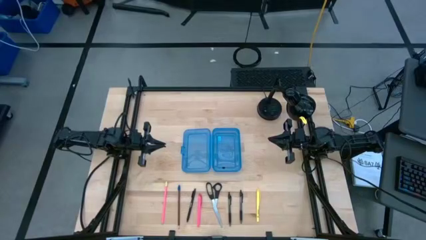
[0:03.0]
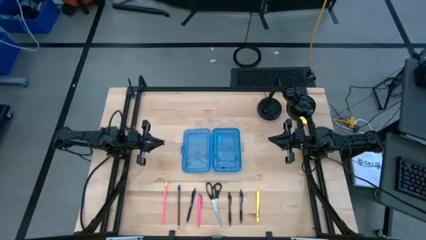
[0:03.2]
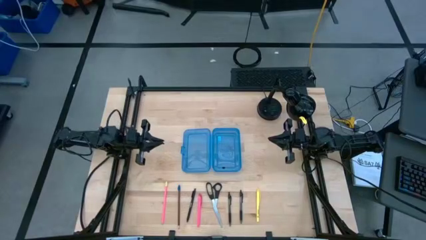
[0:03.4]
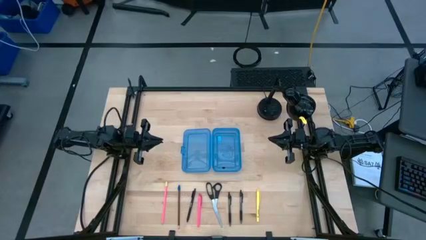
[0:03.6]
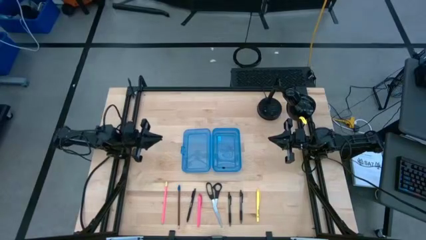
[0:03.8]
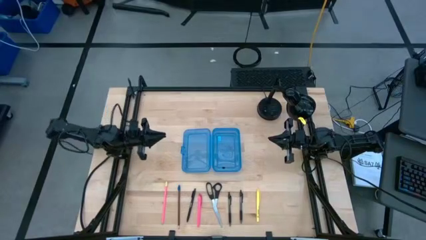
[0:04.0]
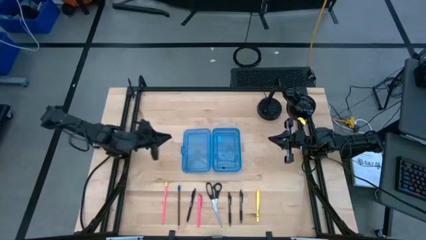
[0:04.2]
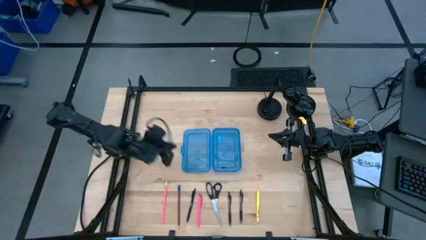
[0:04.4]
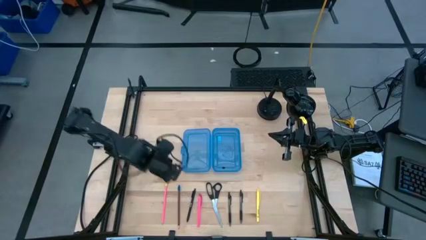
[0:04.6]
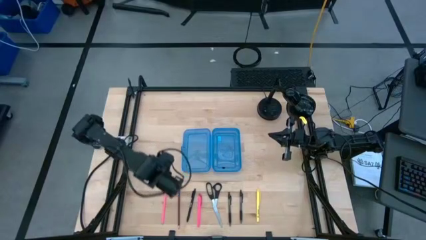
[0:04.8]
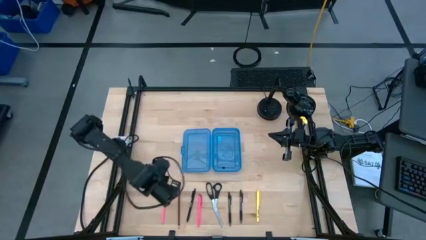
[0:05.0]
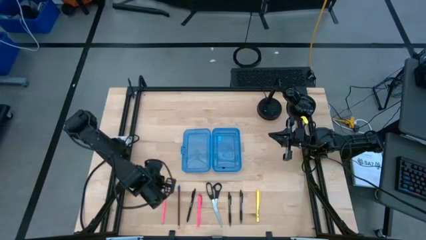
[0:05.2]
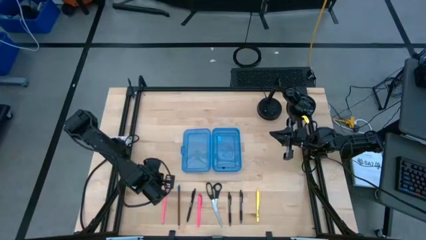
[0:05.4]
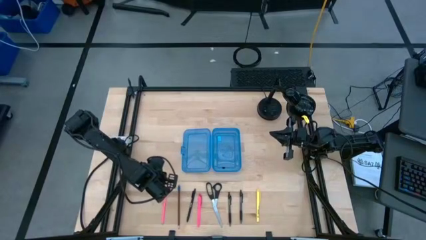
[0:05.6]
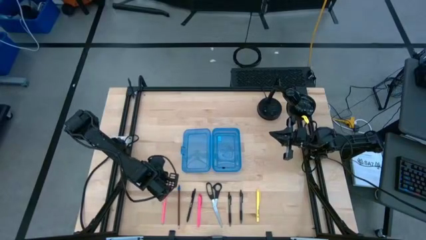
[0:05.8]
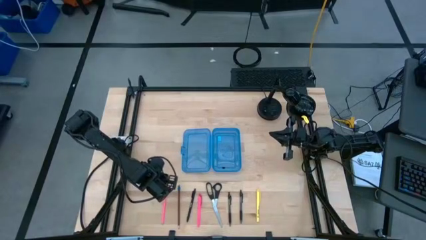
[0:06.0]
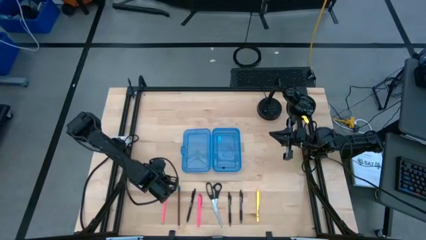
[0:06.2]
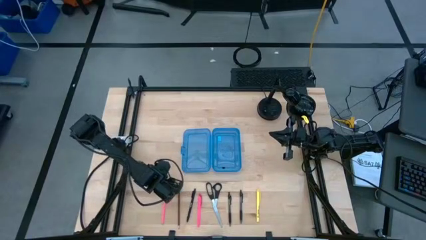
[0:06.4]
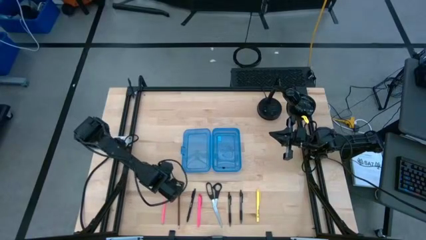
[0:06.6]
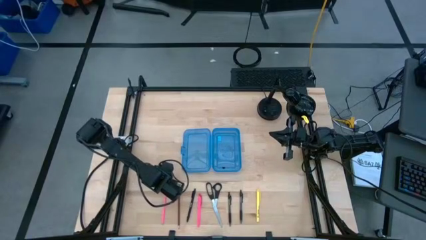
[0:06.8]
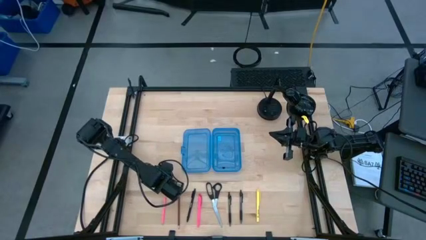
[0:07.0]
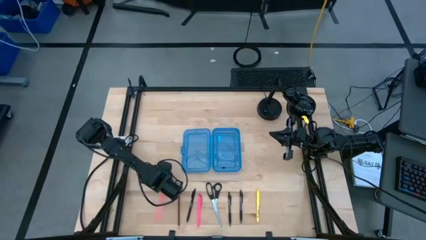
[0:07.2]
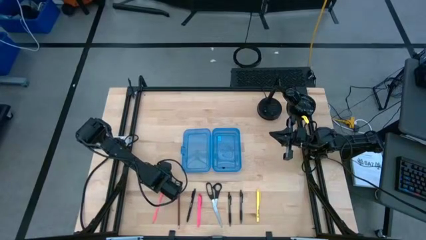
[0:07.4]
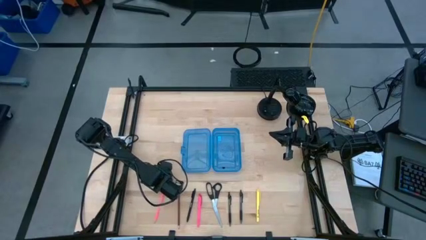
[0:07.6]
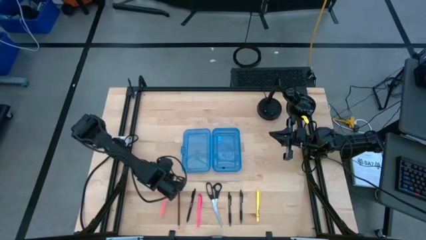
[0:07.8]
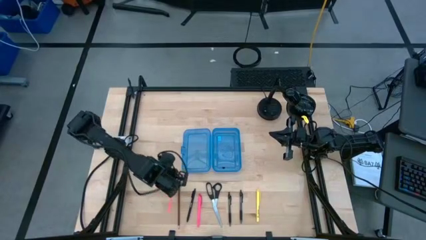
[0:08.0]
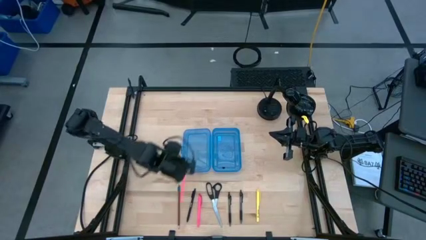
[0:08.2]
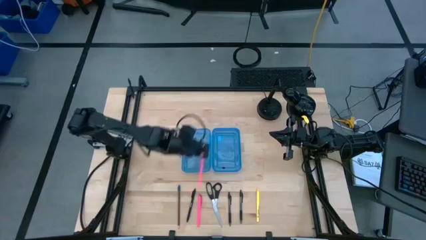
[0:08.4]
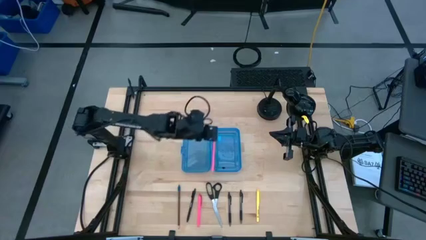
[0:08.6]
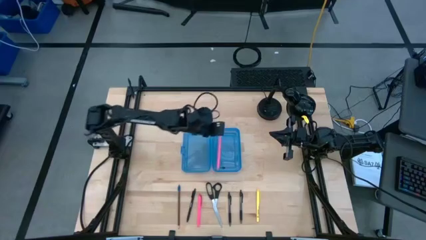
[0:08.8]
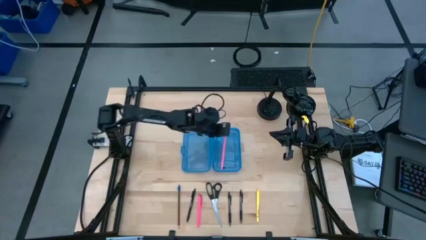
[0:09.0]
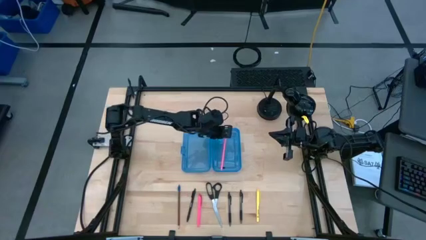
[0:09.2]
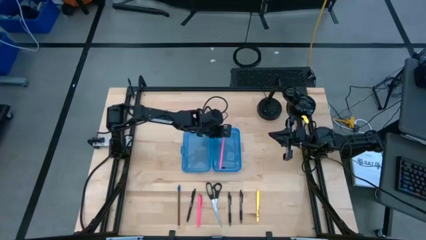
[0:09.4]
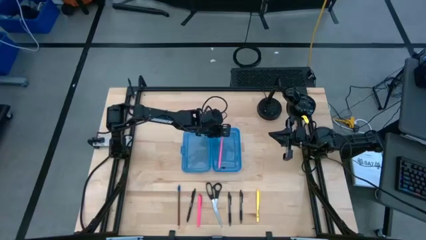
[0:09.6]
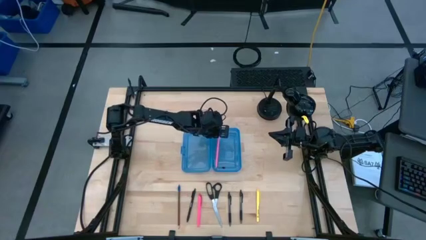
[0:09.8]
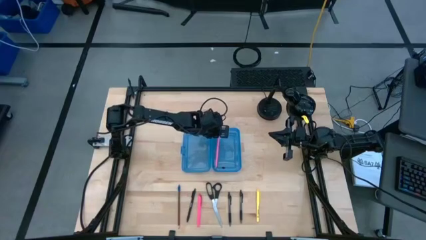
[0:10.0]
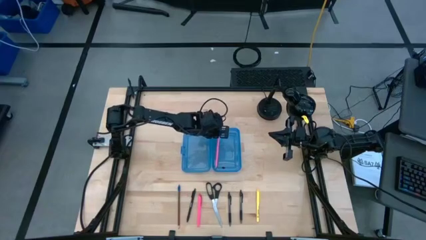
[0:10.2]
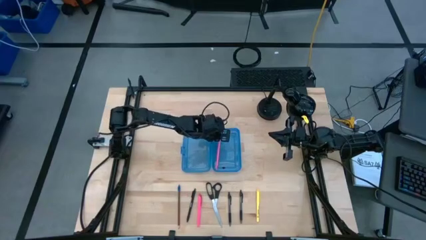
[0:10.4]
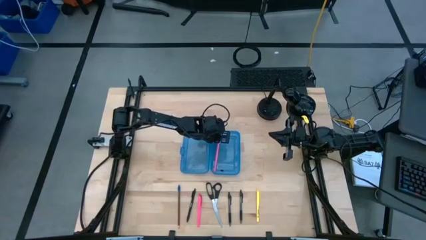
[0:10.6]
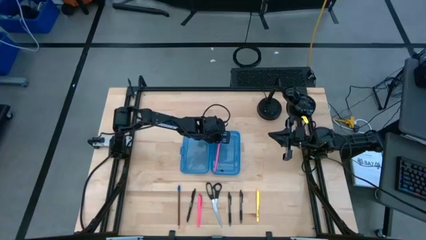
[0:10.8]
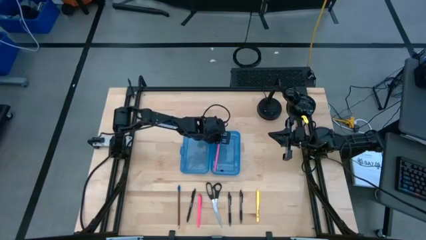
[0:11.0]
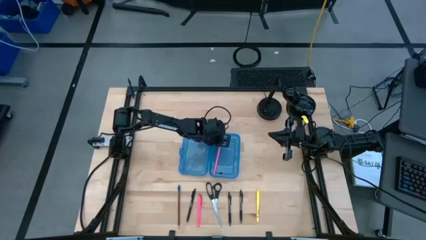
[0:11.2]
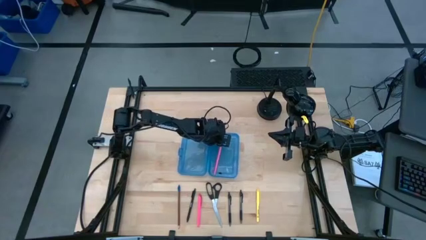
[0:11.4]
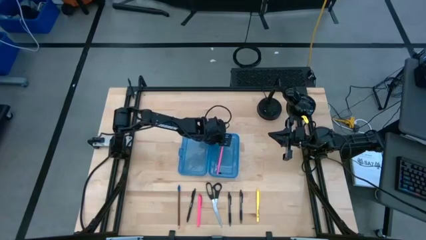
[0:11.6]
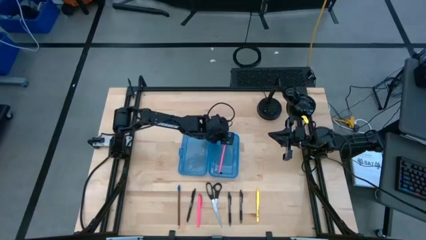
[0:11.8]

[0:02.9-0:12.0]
Task: Pick & place school supplies into a supply box
Put the pink pencil into the blue pencil box

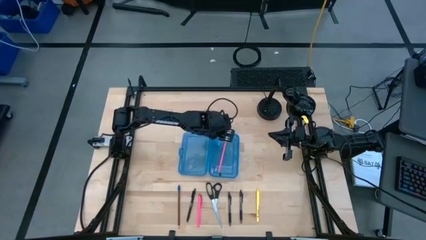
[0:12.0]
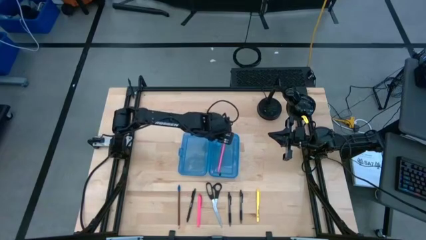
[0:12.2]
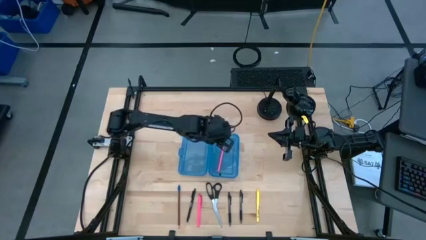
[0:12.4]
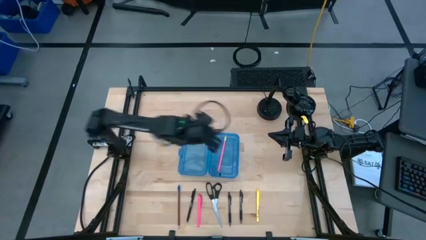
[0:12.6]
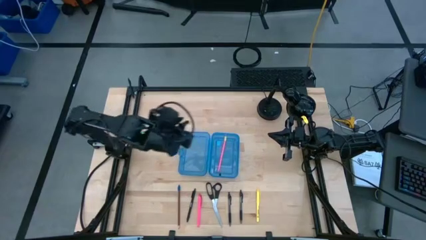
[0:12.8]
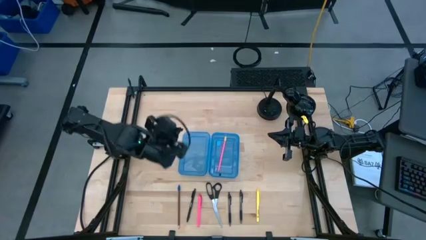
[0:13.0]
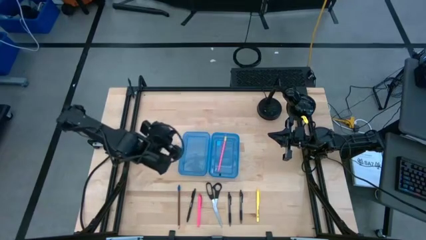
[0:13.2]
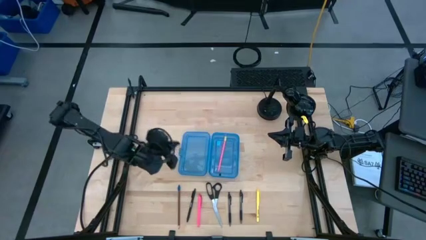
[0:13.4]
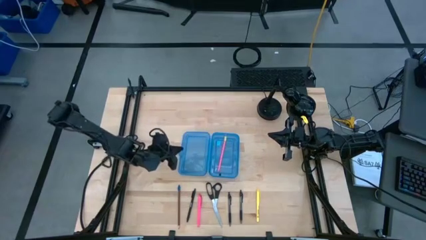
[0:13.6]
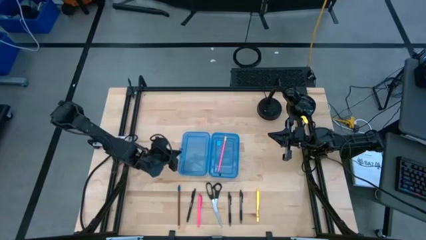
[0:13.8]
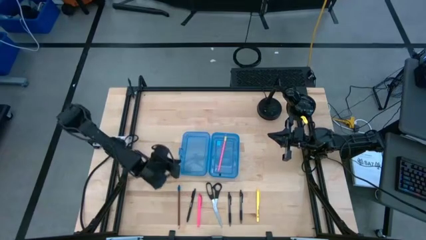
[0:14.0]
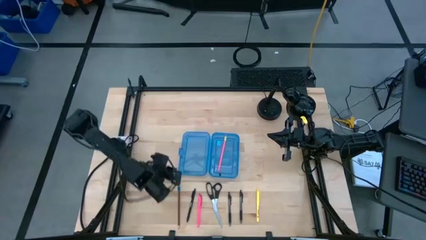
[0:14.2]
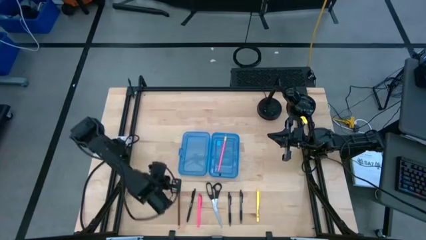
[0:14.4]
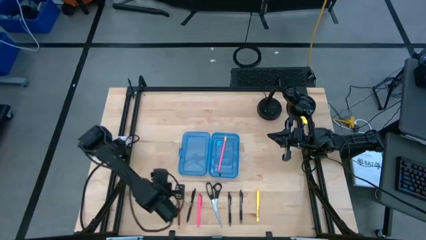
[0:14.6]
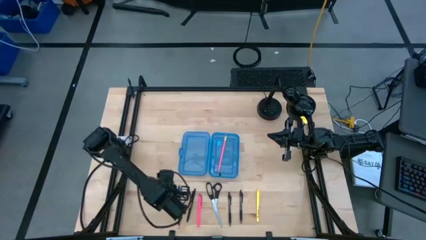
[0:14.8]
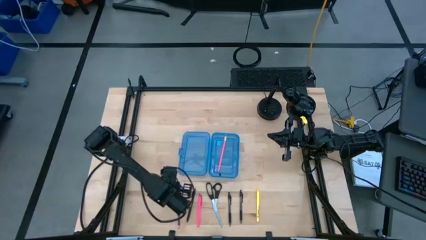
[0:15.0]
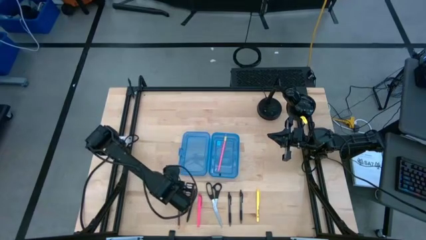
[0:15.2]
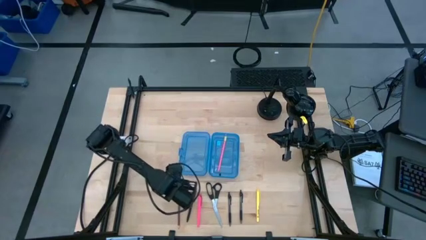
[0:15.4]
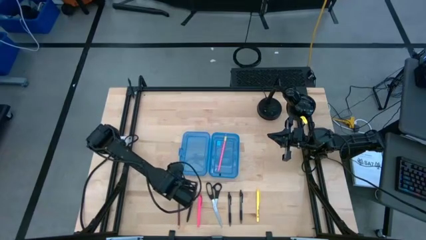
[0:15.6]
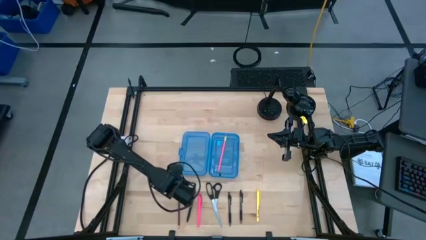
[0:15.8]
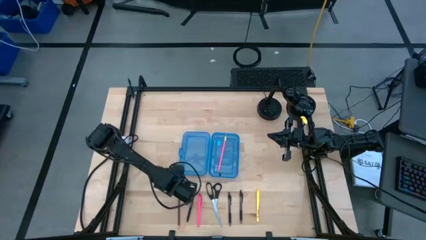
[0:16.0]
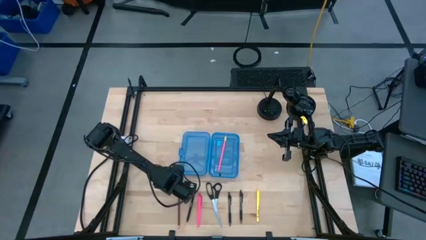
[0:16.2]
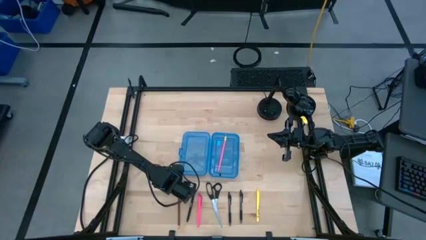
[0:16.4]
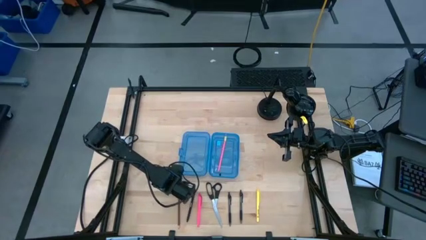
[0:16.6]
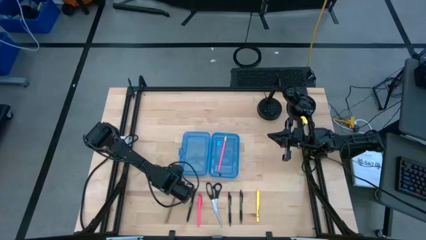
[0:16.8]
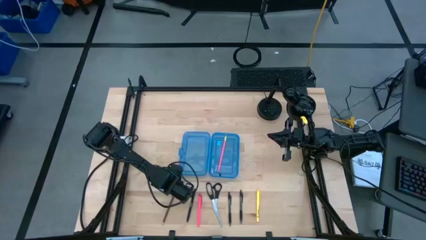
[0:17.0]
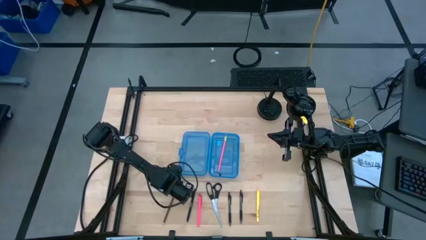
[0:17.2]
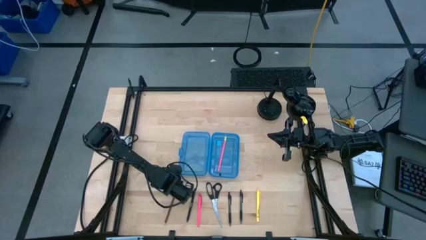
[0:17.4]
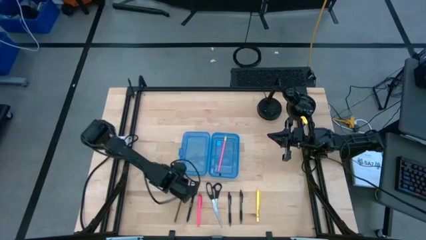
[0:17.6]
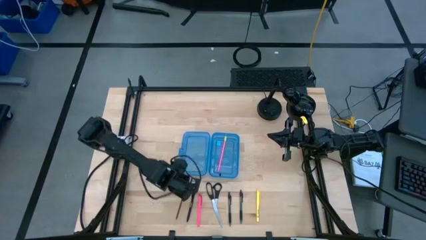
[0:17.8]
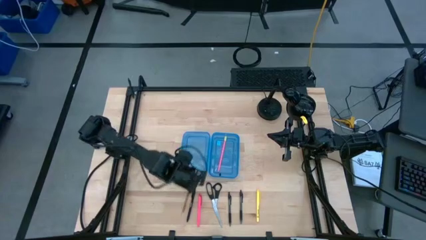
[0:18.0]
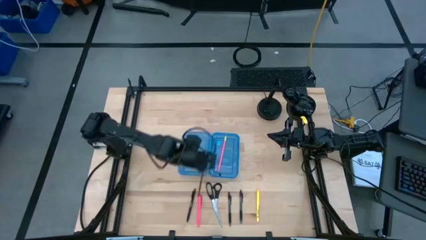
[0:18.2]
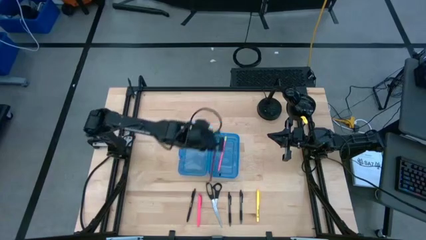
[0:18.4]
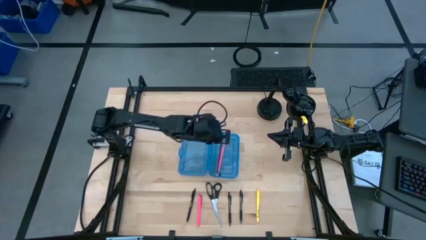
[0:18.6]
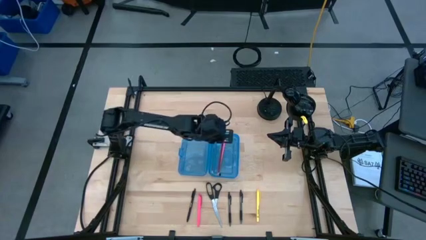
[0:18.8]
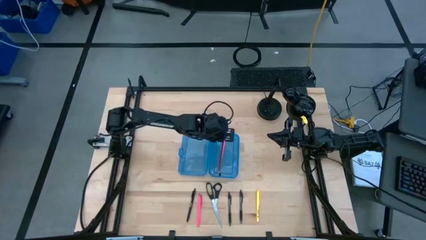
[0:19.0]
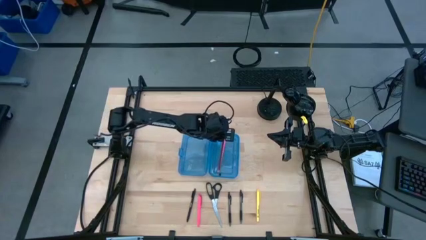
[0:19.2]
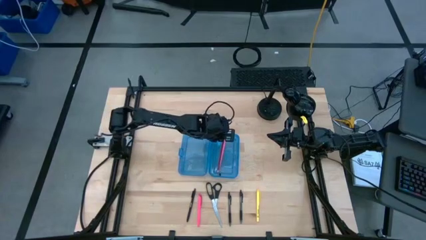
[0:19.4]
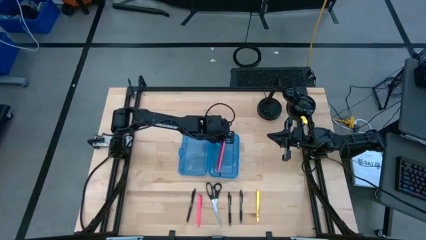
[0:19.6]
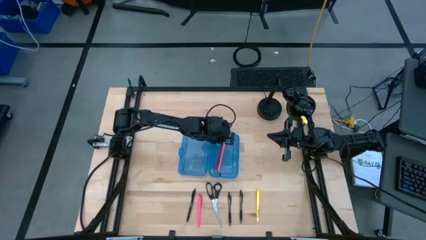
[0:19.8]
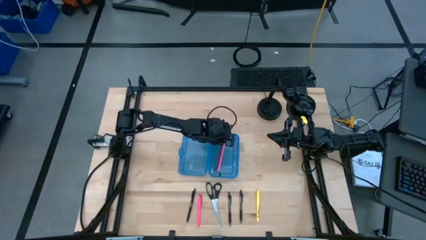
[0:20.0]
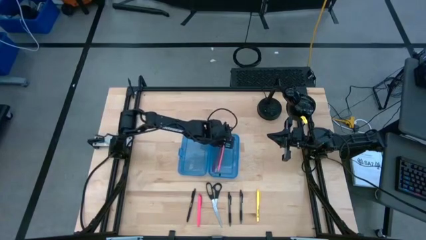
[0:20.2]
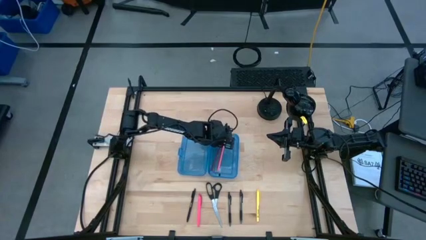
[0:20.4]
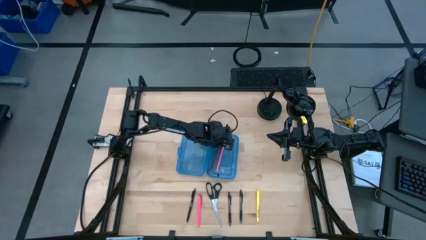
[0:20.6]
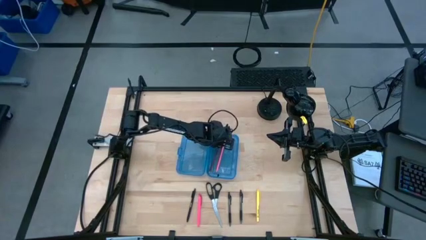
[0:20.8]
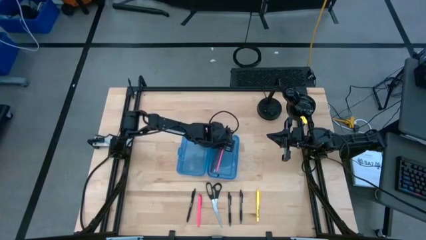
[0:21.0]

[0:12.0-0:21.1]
Put the brown pencil into the blue pencil box
